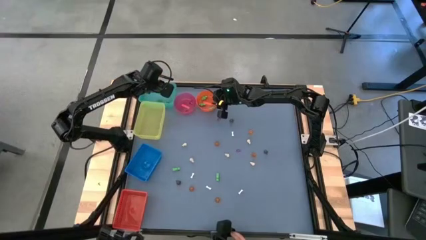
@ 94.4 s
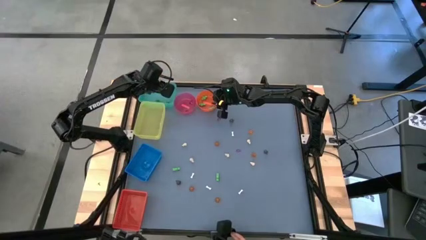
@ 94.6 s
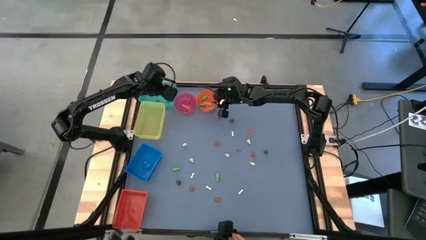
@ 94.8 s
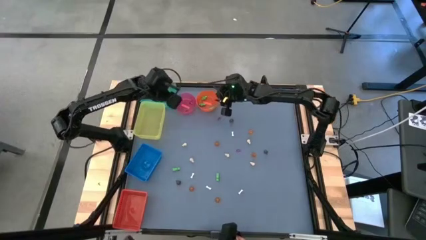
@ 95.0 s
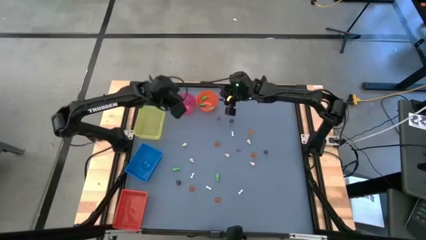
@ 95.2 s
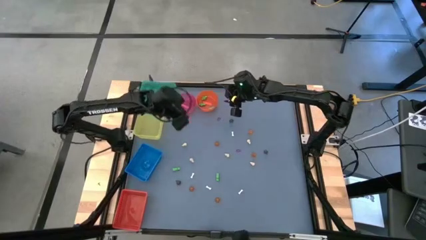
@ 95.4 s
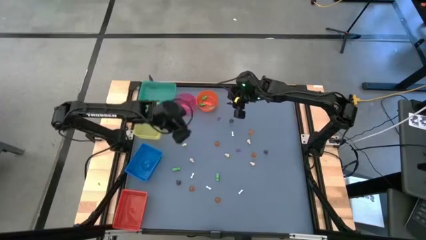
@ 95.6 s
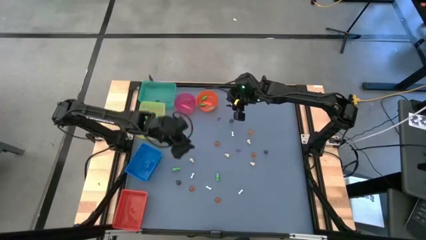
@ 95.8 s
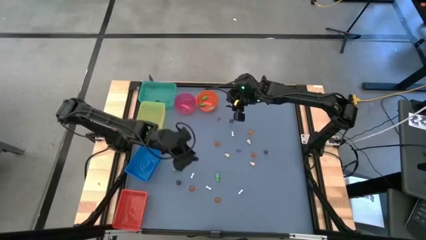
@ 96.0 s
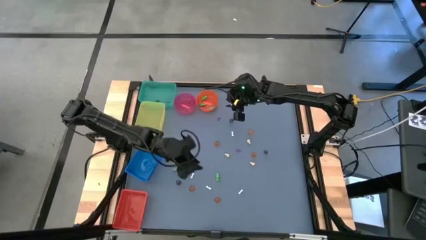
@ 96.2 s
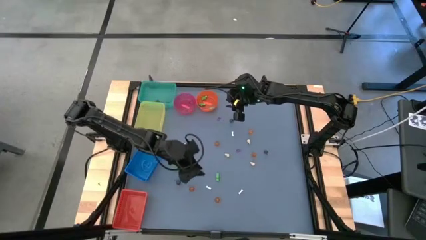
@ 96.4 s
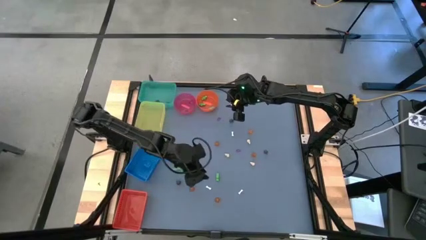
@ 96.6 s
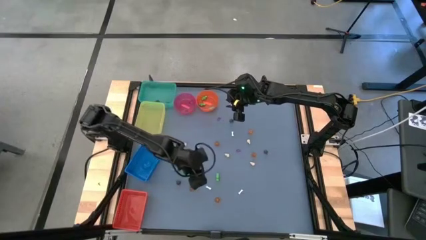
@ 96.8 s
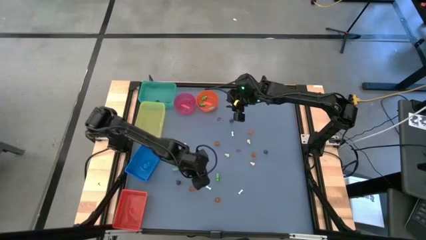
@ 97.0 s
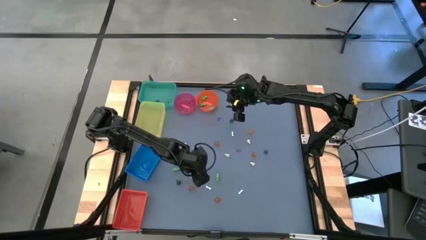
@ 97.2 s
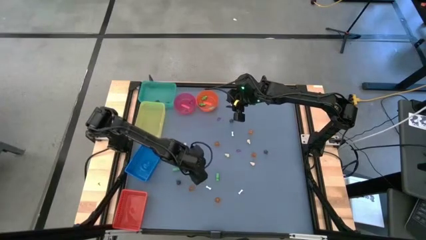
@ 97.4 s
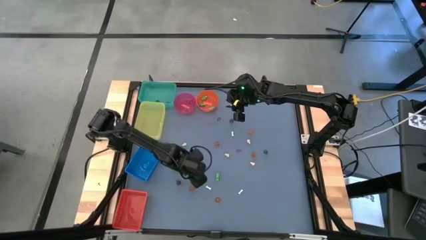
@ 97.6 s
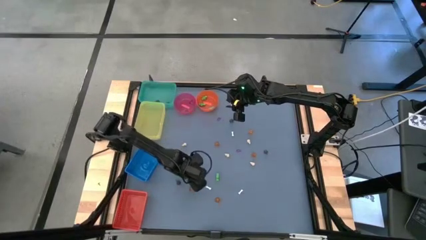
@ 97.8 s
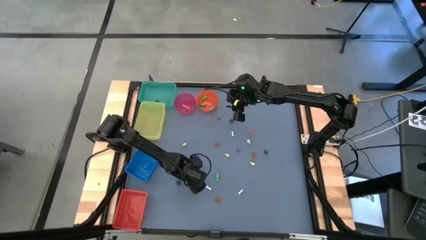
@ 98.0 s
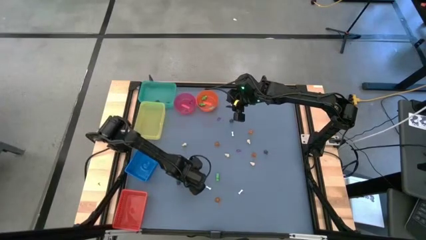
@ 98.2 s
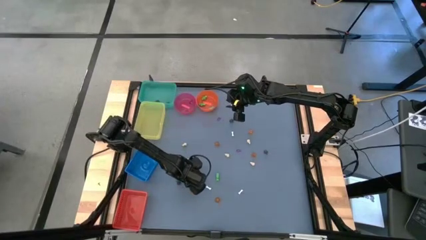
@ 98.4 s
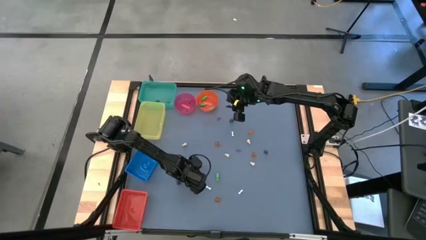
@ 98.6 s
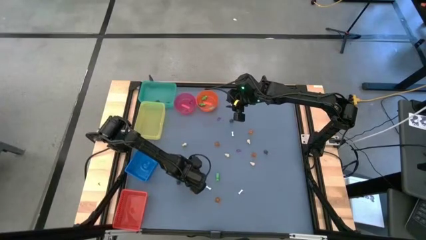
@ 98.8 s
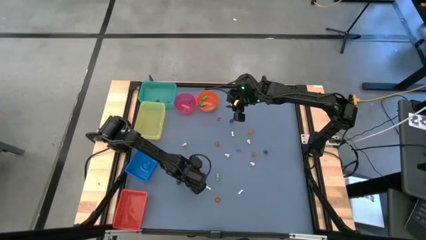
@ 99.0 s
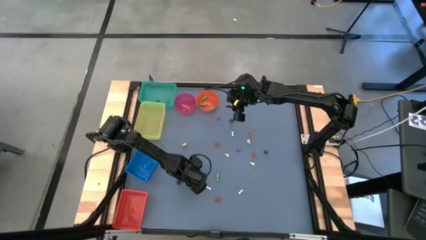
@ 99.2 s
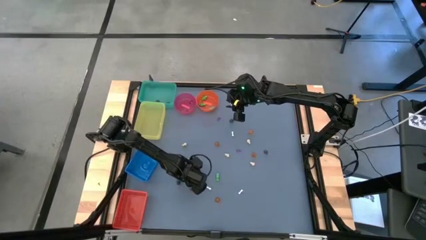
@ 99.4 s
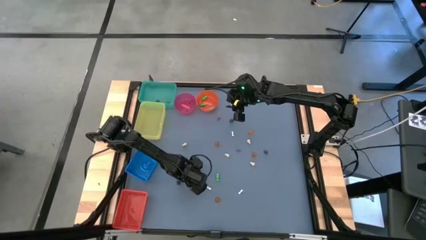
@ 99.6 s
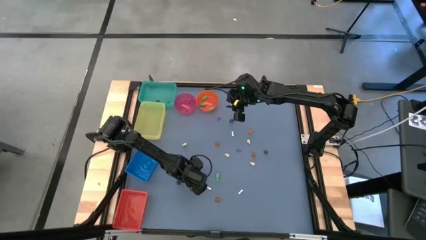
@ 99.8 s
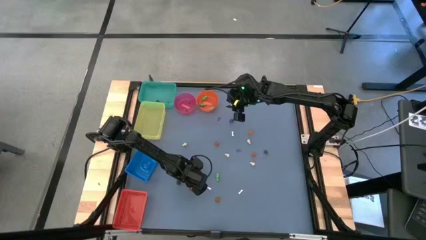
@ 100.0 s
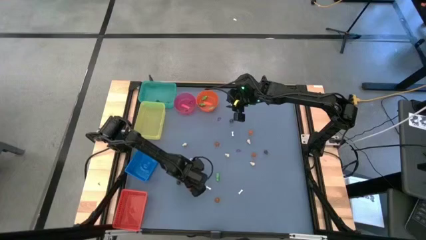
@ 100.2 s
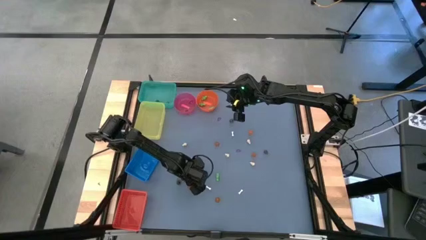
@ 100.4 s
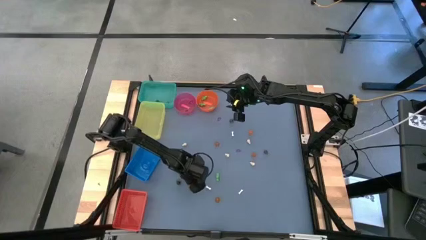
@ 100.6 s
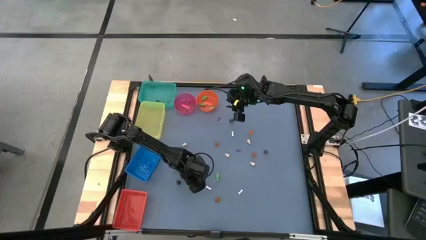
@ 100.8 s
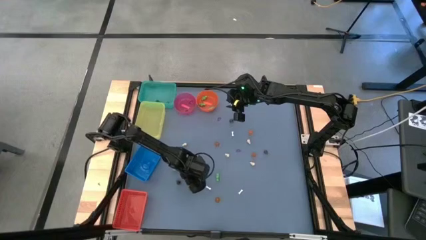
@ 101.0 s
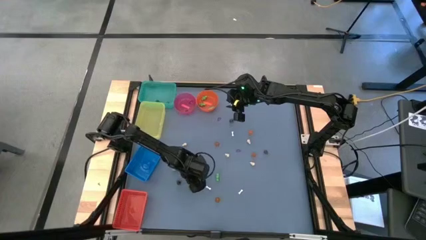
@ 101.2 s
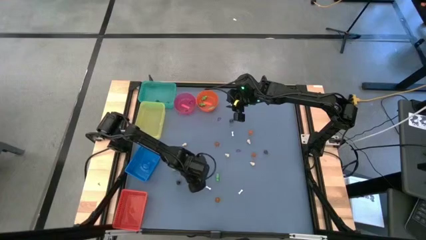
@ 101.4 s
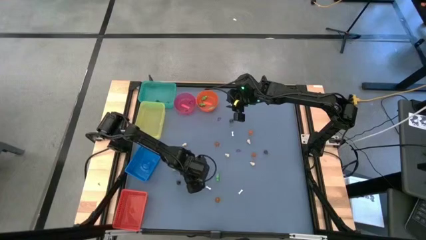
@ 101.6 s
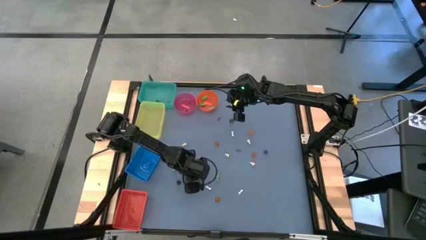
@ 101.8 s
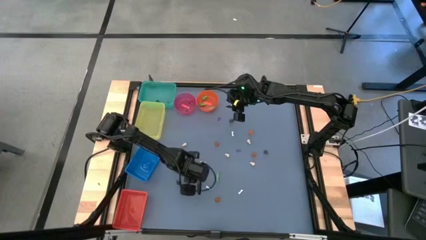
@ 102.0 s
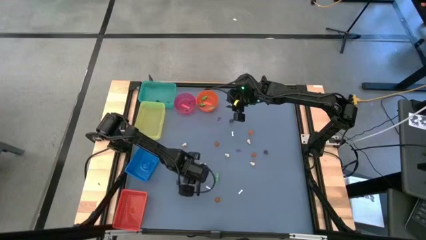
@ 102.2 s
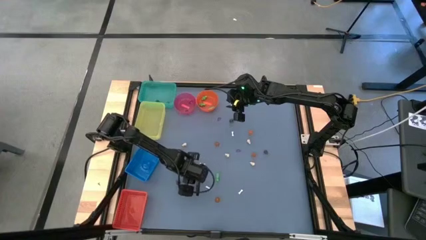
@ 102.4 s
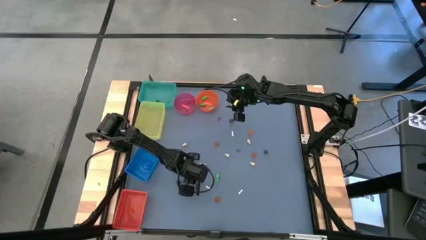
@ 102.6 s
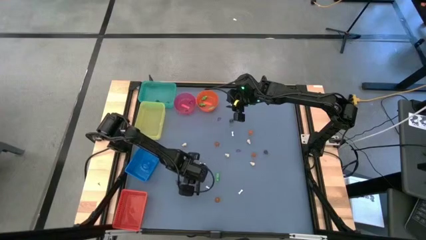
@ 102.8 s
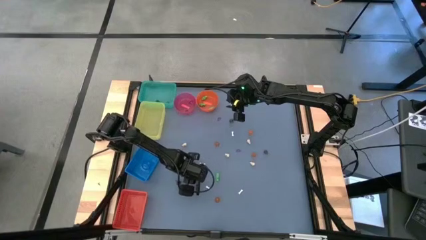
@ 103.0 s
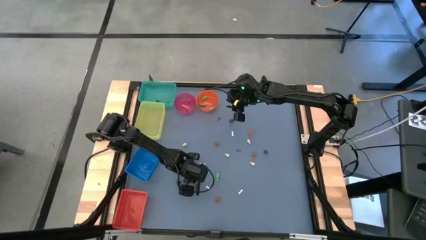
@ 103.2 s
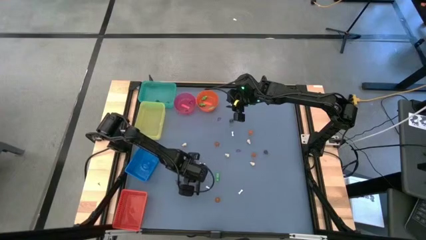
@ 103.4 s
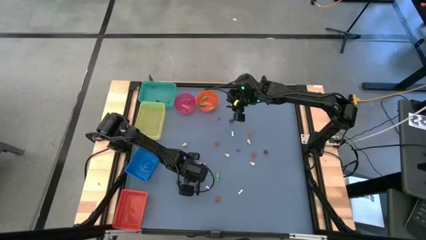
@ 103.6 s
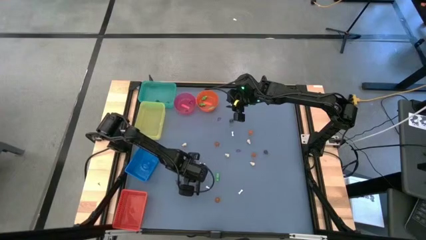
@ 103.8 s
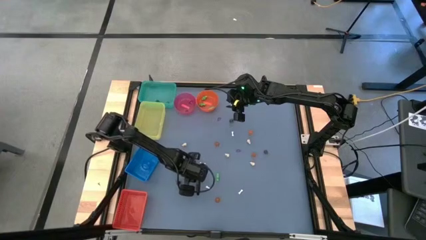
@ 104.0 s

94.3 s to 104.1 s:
Task: Sort Halloween decoration
Put the white bone toy into the yellow bin

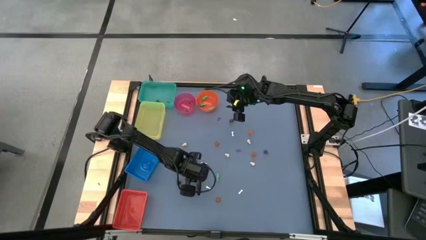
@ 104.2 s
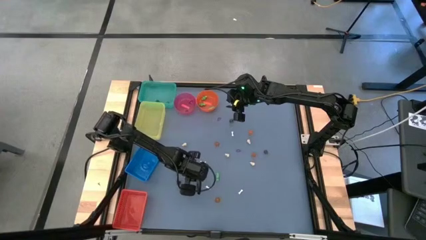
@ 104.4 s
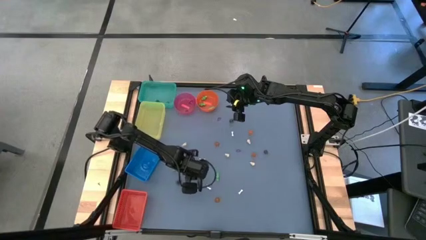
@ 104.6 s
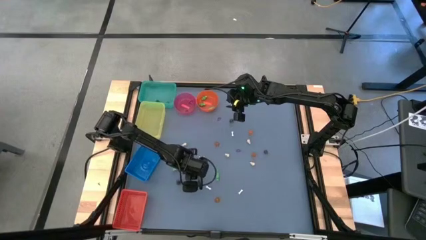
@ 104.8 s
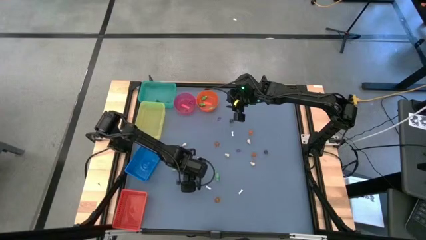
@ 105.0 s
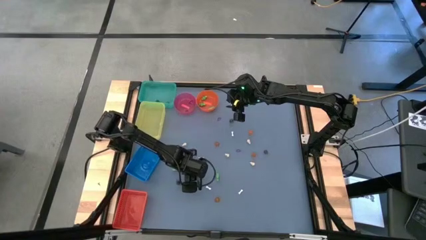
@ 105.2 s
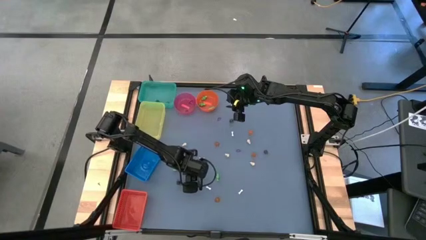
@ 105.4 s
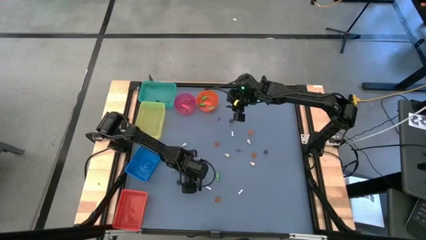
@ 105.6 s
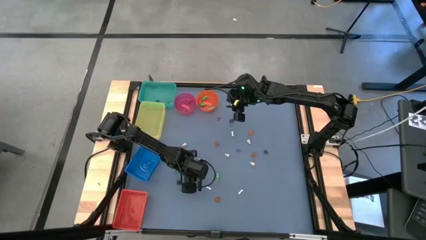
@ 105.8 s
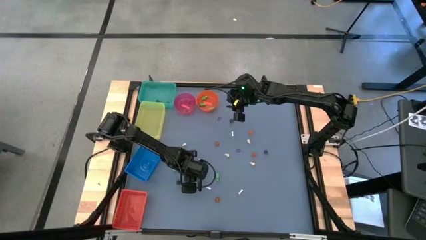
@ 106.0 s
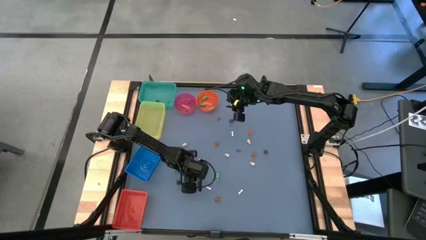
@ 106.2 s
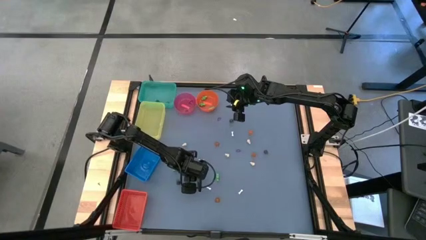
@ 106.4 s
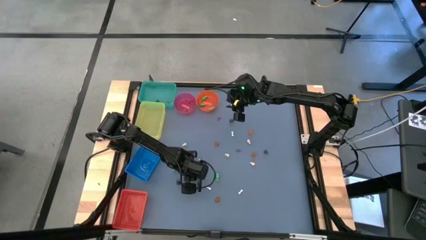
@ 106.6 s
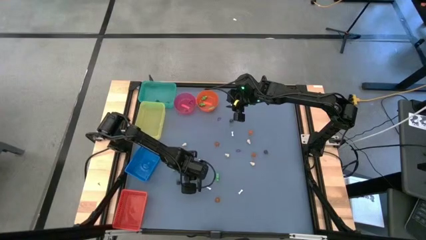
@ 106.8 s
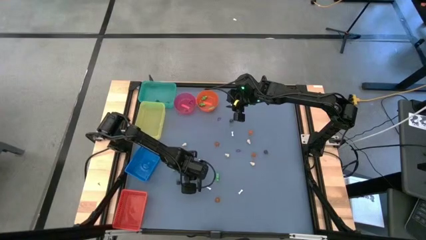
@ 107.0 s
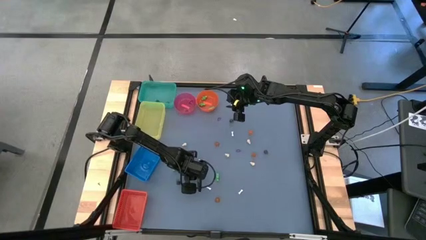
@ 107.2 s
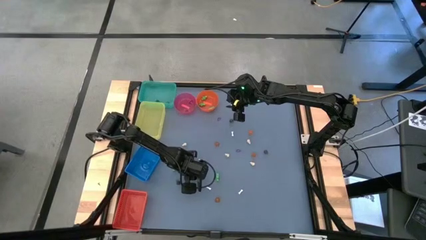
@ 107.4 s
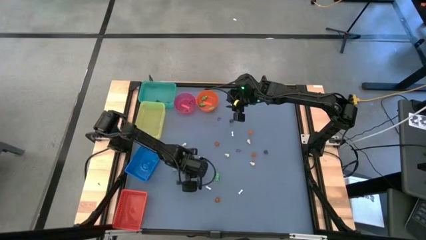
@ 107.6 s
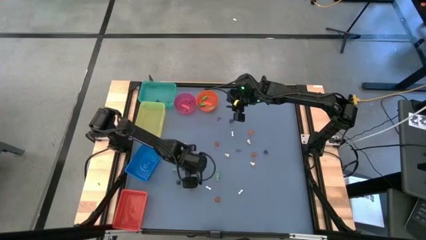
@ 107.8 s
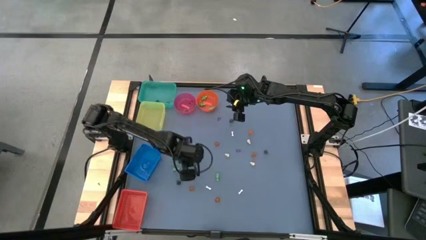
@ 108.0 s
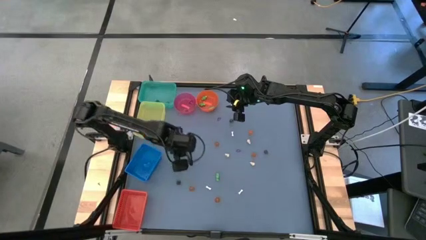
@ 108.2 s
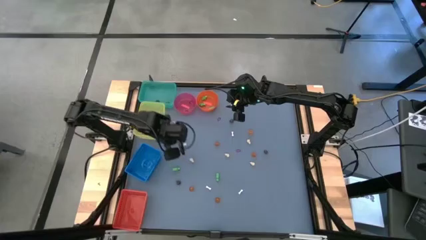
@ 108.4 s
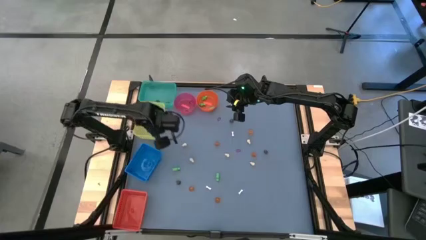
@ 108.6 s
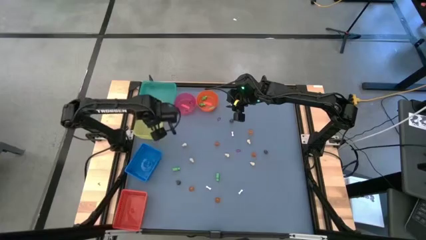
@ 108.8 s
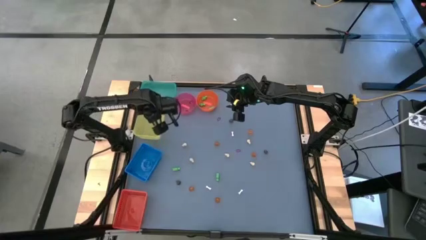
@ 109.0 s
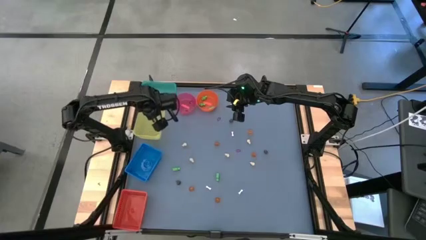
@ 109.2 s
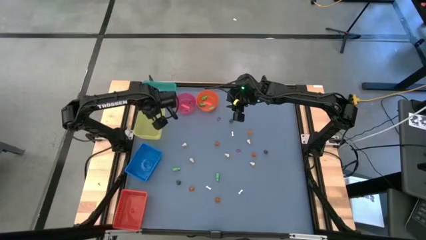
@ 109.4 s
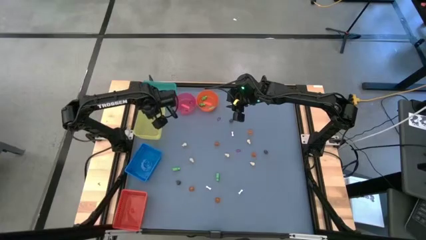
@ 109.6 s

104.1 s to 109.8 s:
Put the white bone toy into the yellow bin
